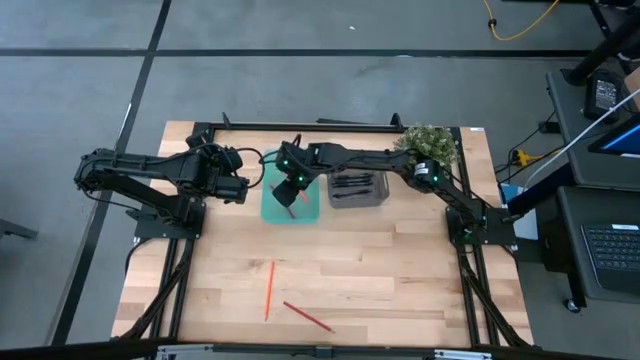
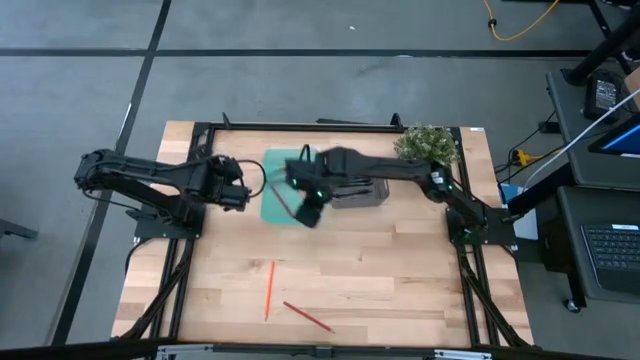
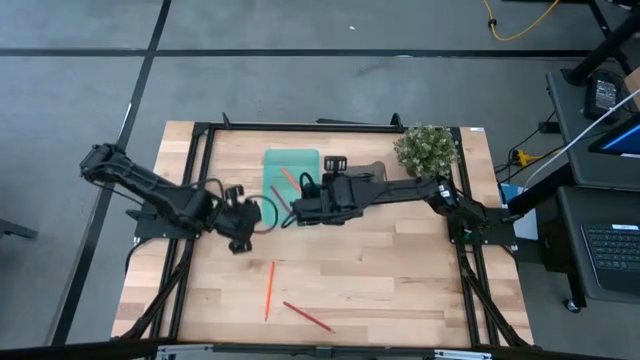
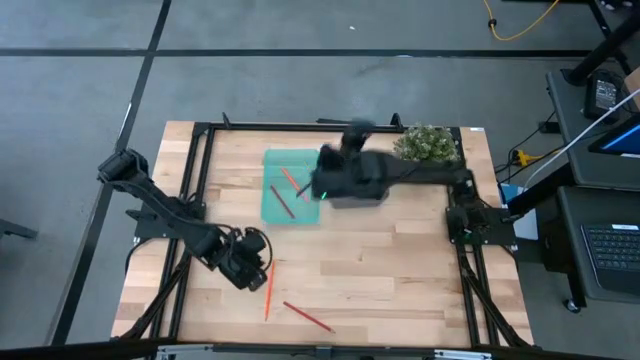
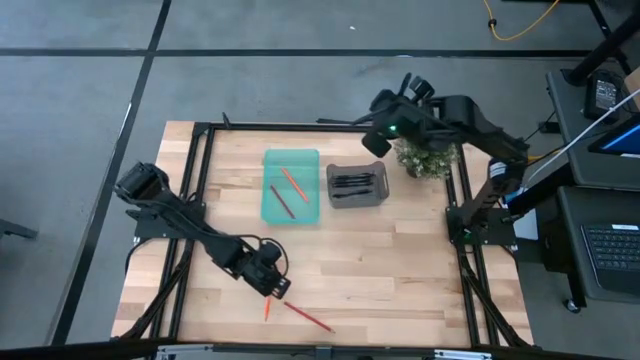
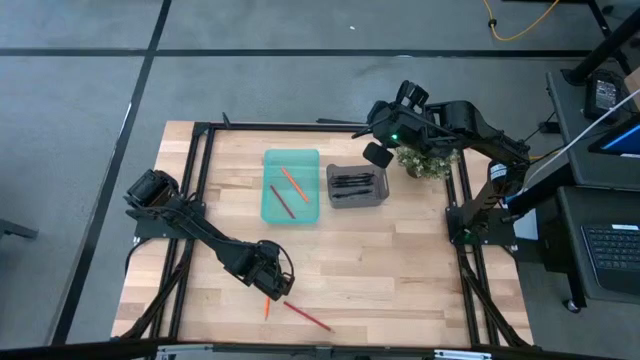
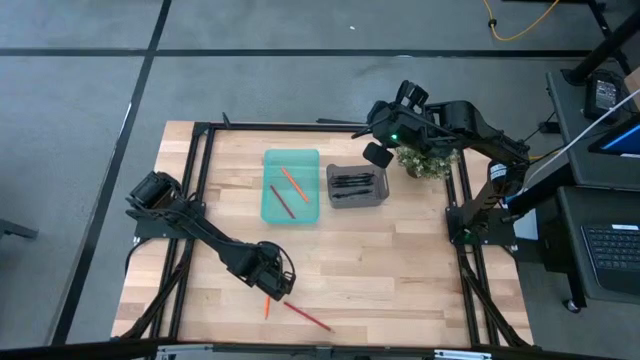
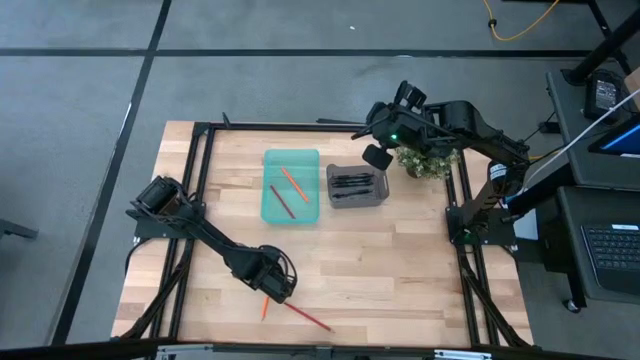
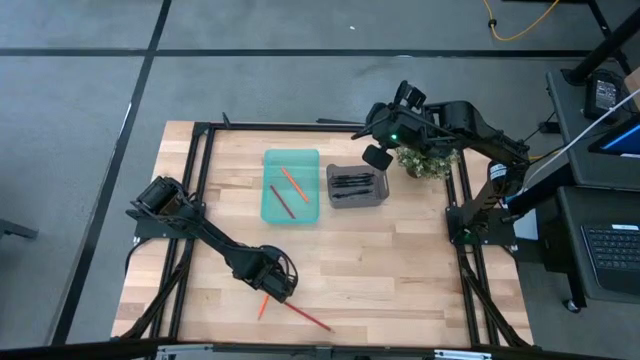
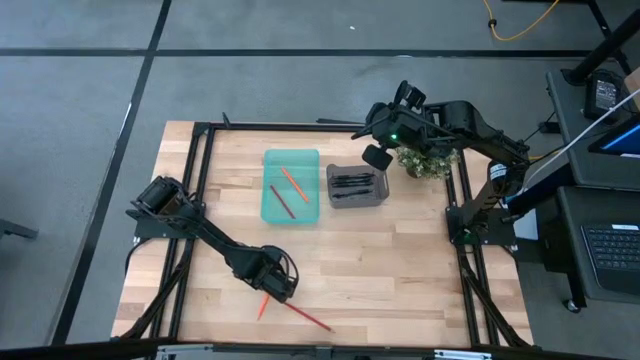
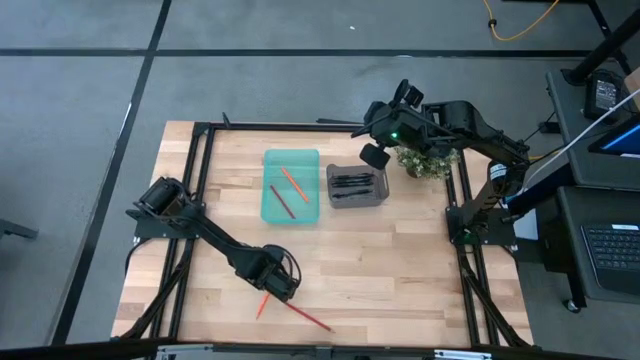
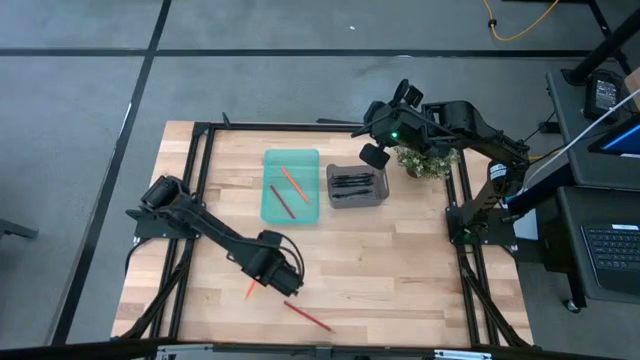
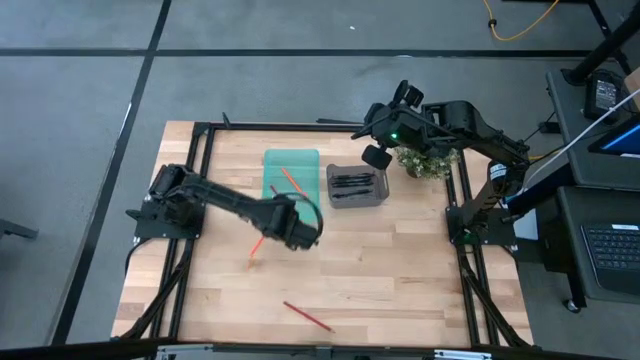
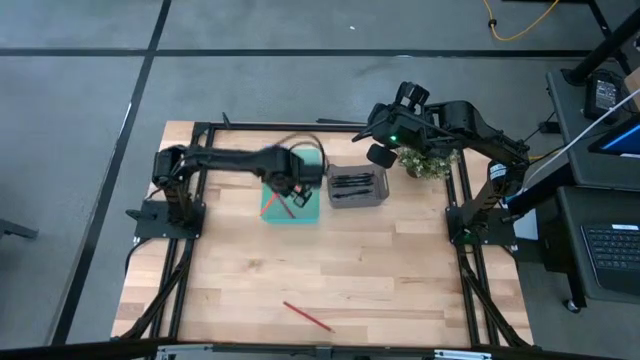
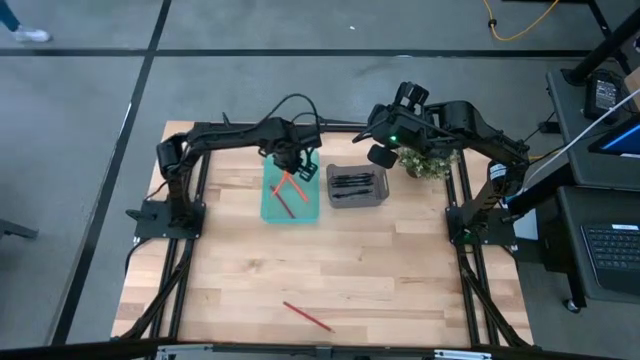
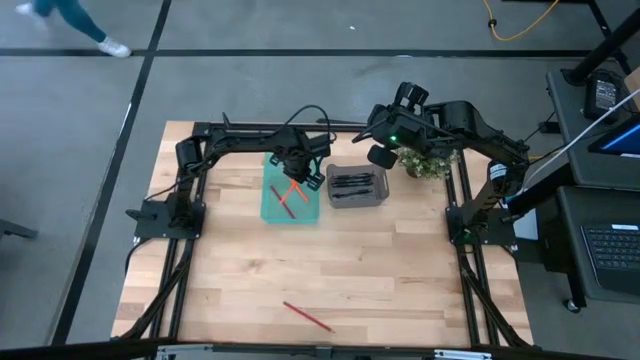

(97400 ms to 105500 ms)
Task: Sort pens & pencils
Put the orange pencil into the green bin

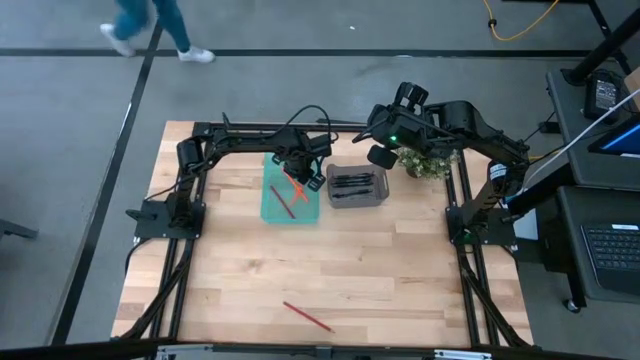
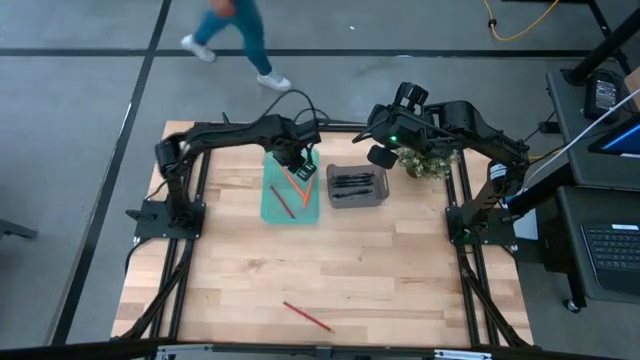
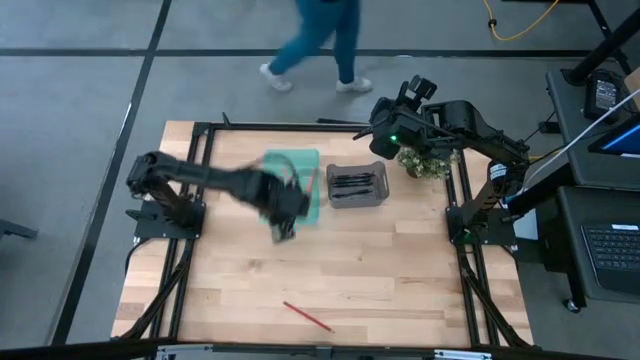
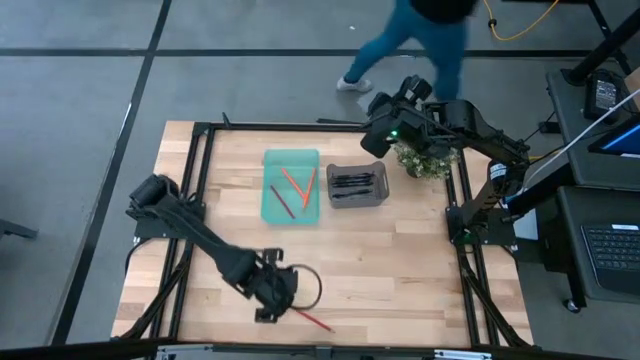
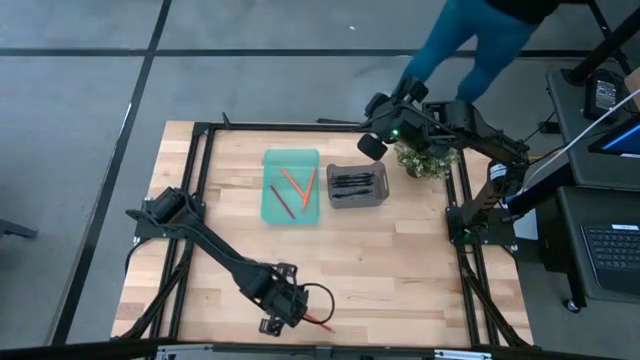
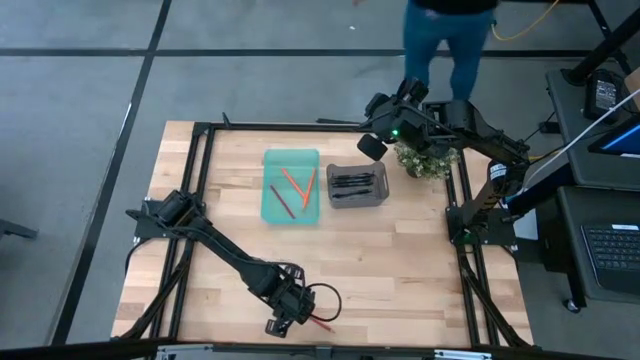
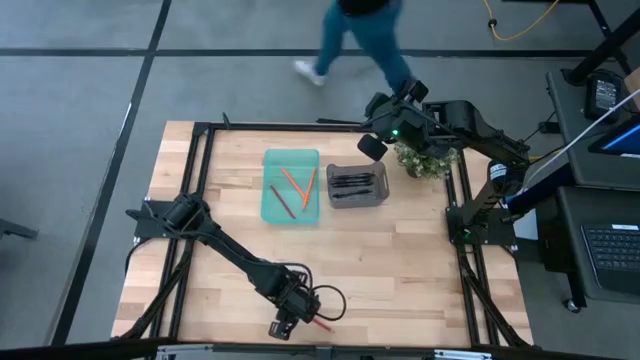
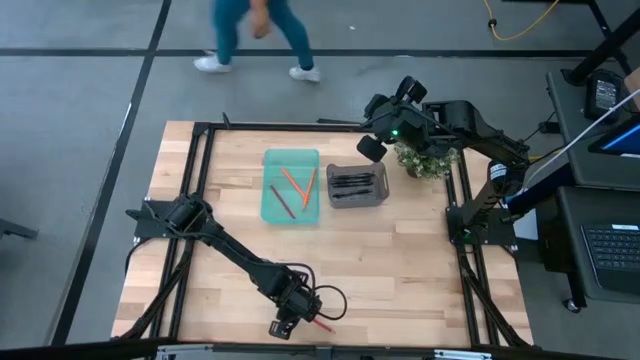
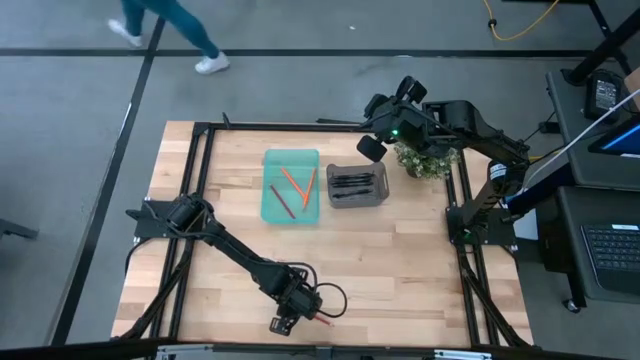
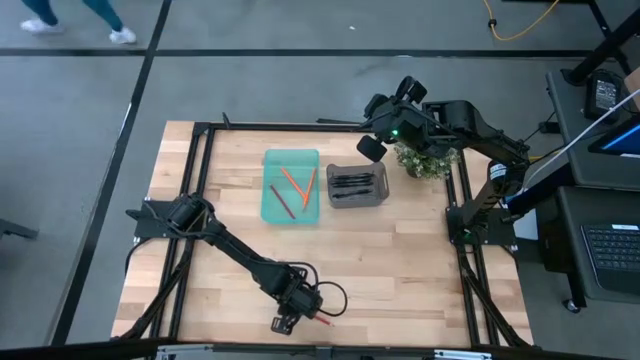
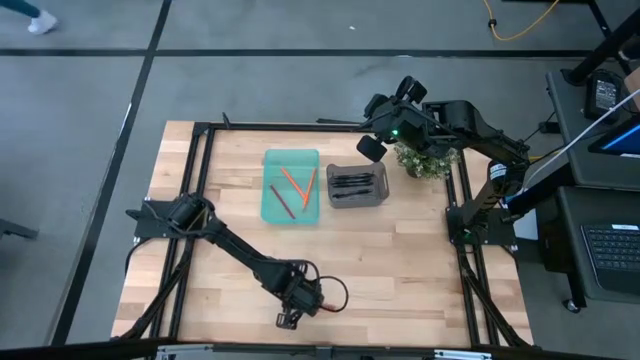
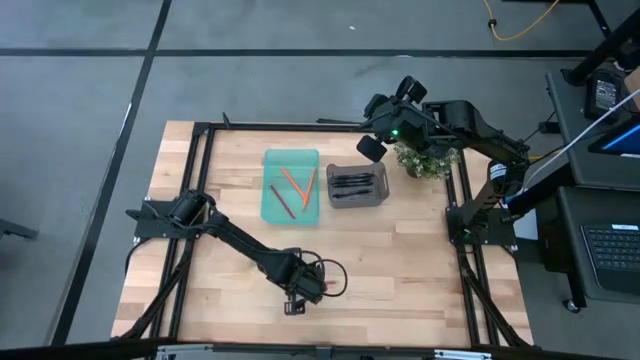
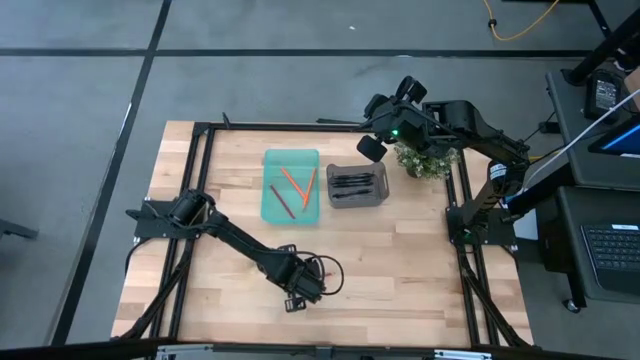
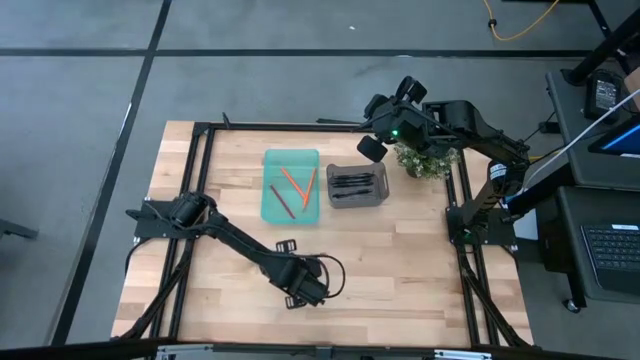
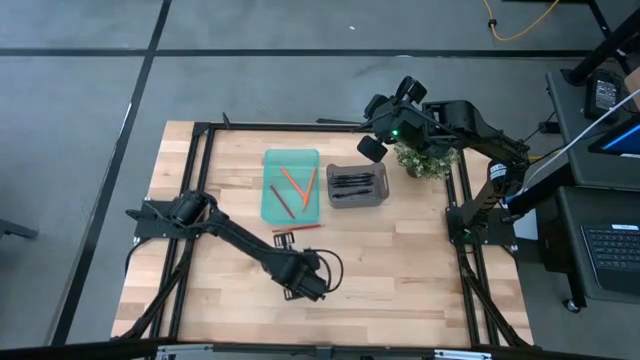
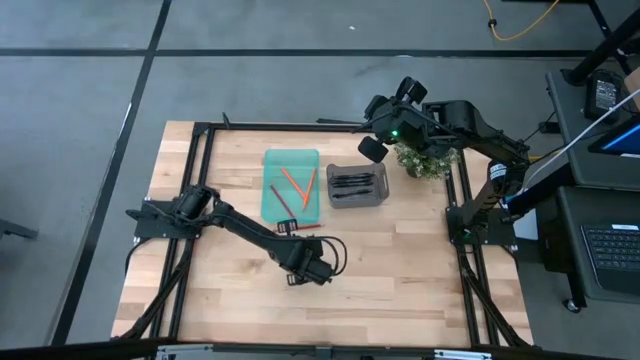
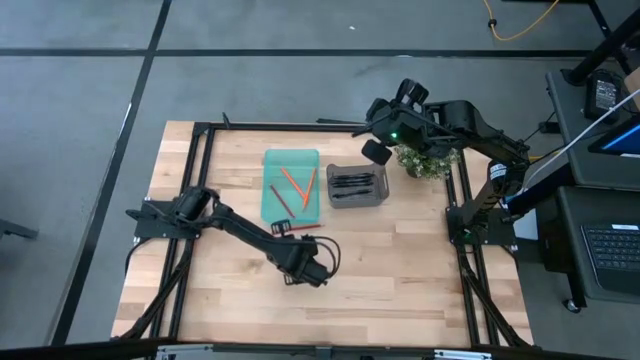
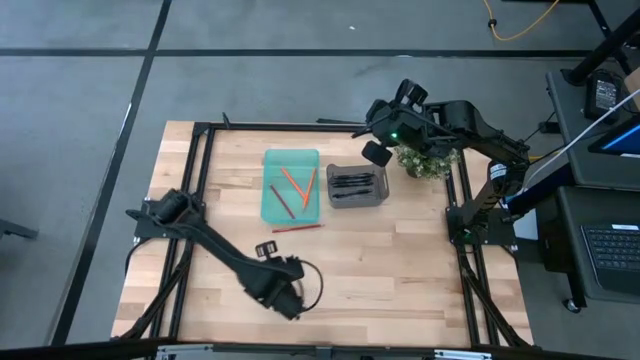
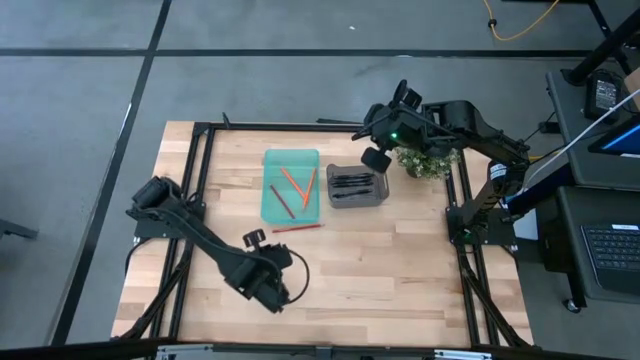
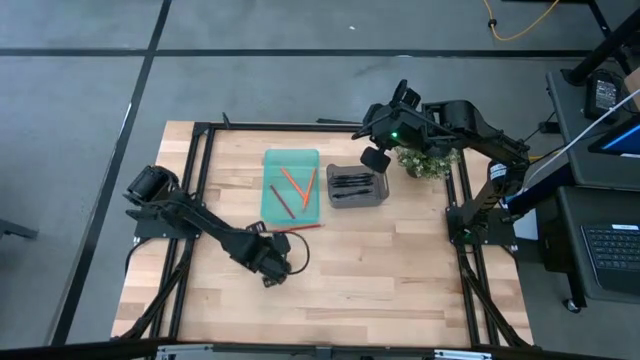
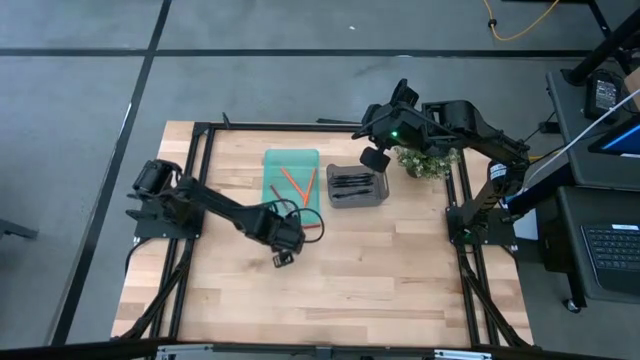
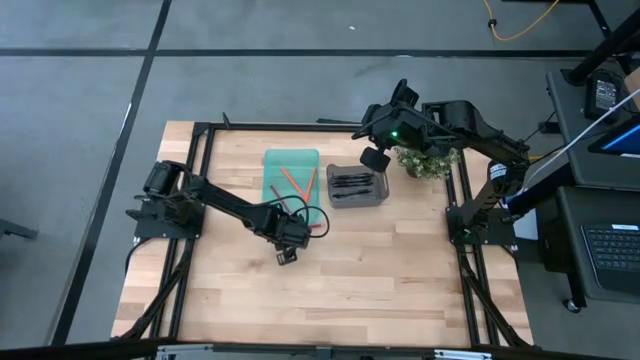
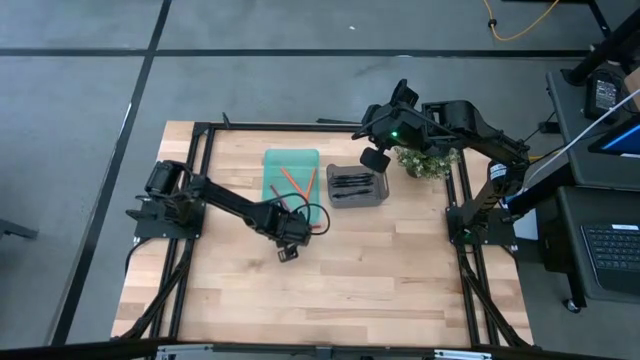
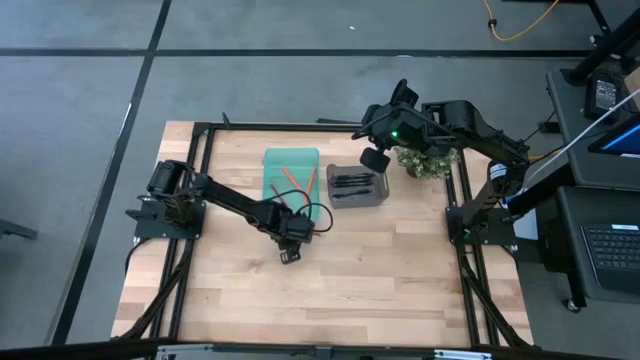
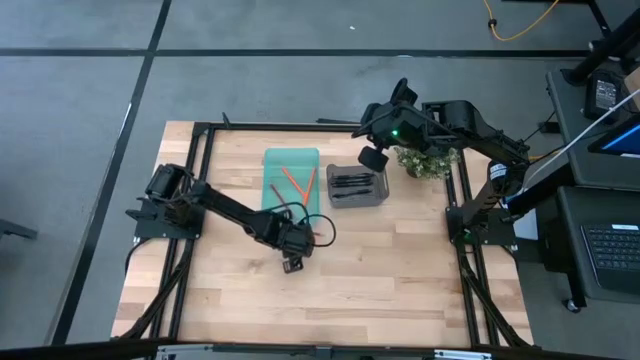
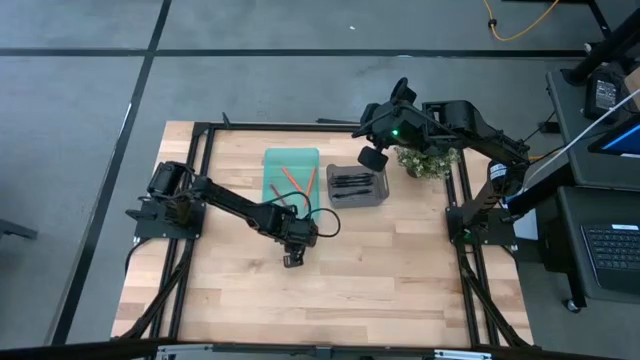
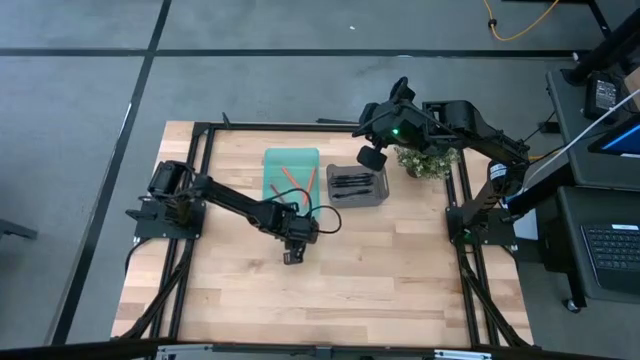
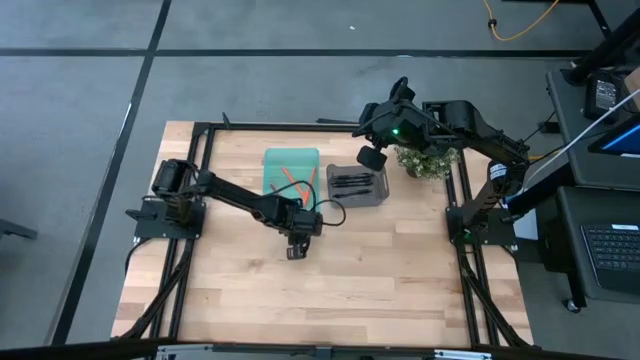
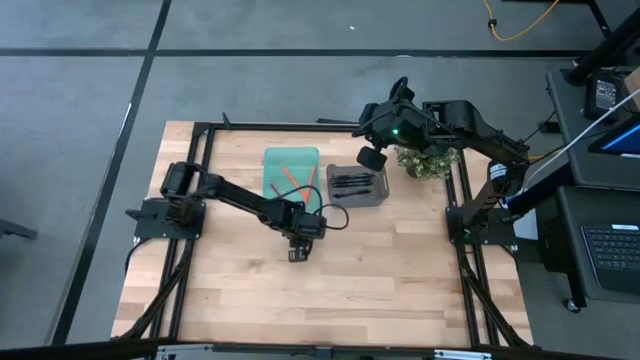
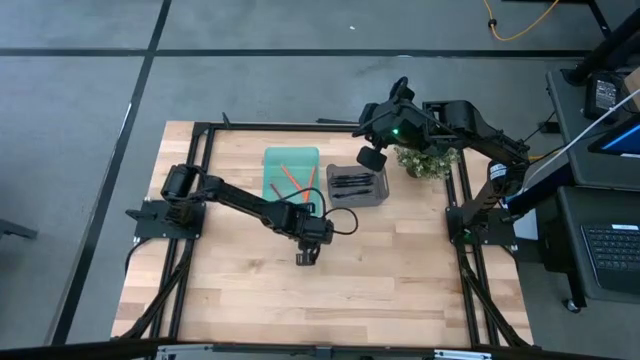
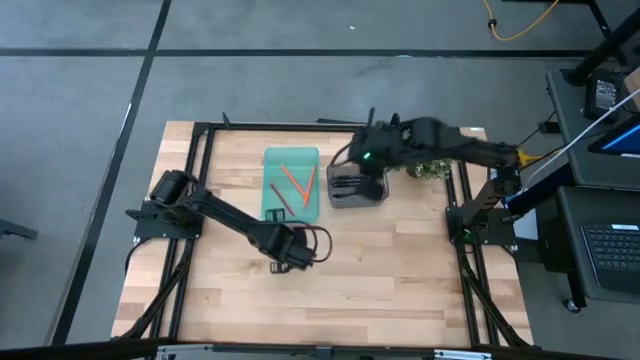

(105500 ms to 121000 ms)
Put the red pencil into the green bin
